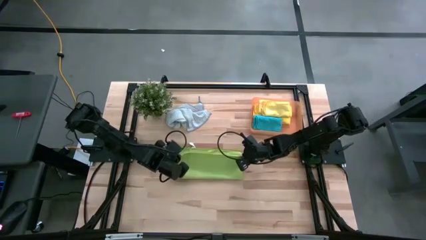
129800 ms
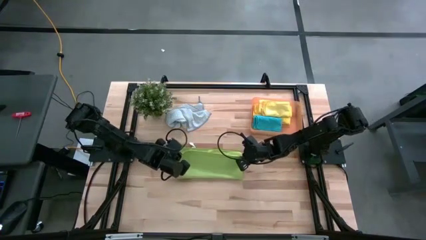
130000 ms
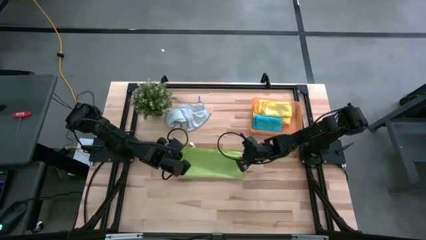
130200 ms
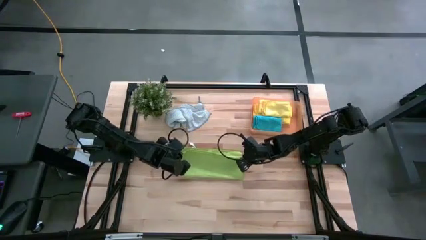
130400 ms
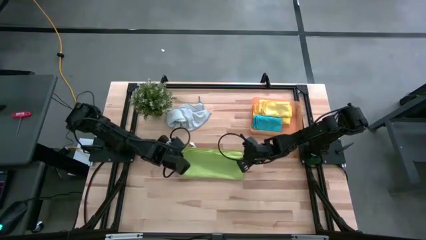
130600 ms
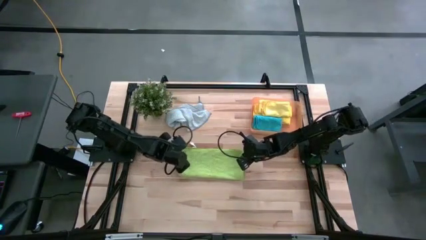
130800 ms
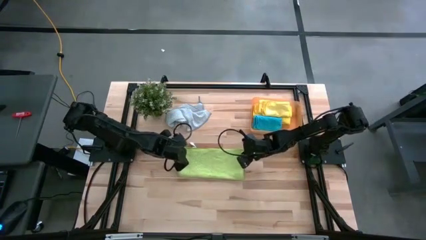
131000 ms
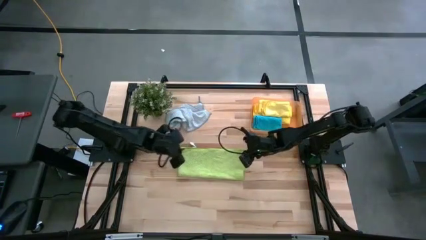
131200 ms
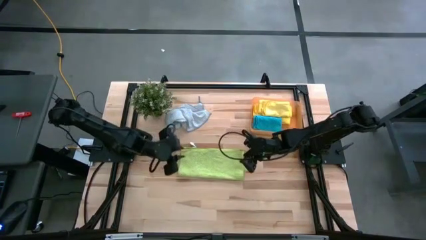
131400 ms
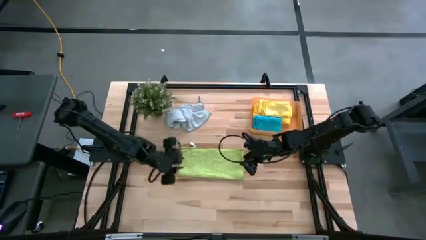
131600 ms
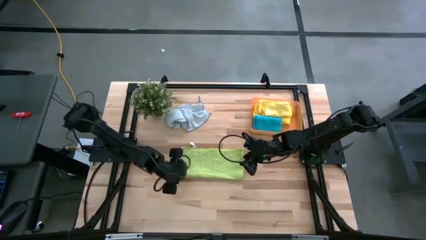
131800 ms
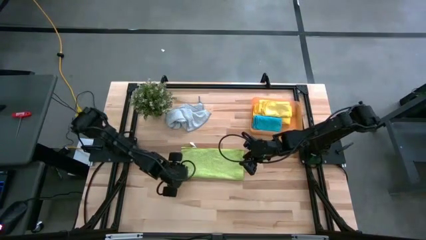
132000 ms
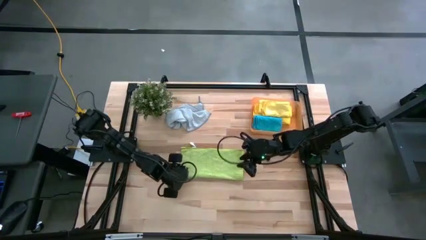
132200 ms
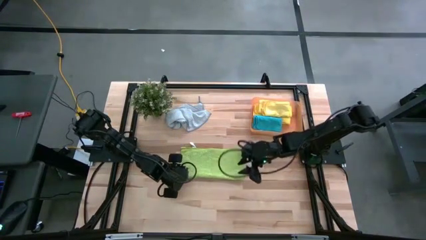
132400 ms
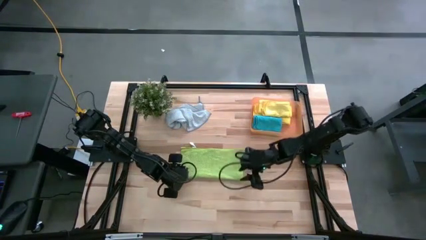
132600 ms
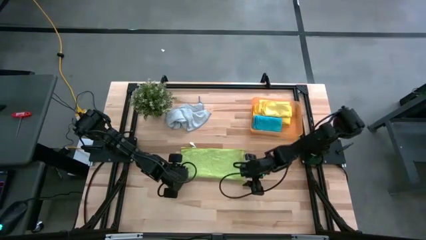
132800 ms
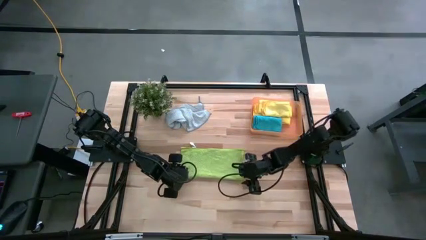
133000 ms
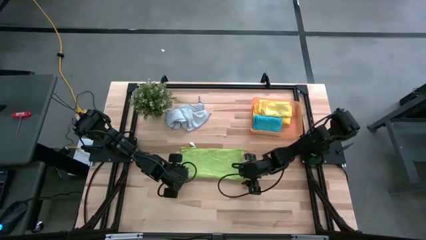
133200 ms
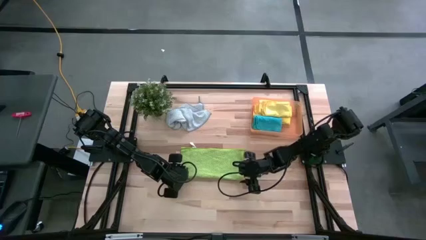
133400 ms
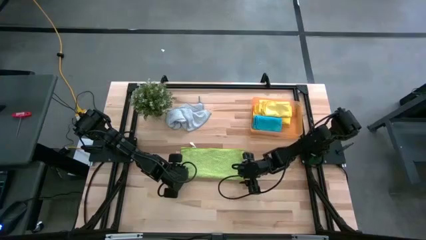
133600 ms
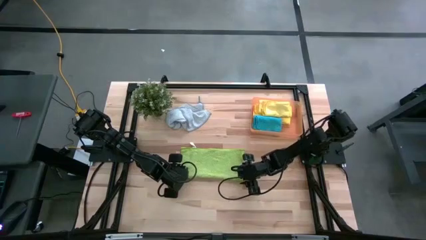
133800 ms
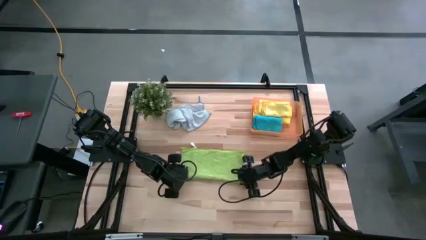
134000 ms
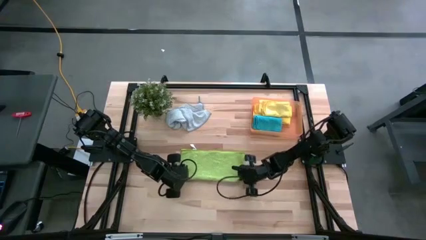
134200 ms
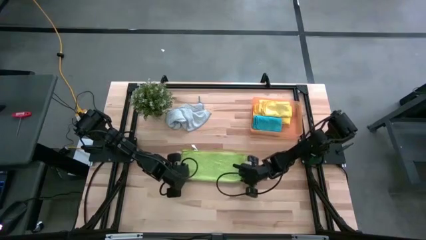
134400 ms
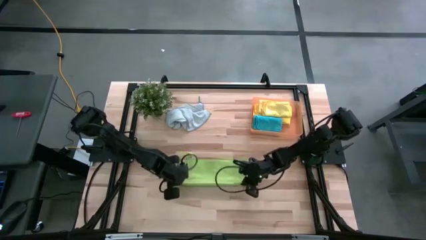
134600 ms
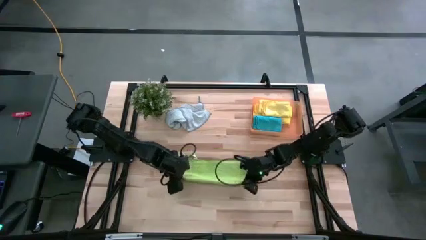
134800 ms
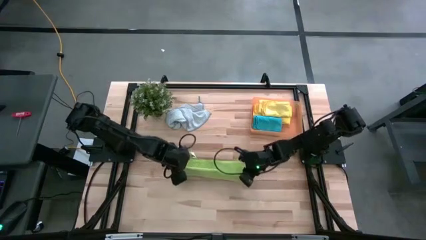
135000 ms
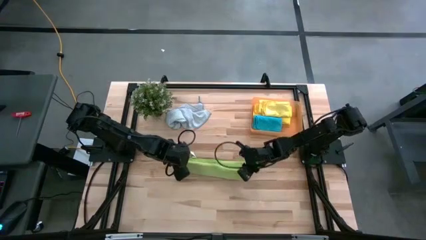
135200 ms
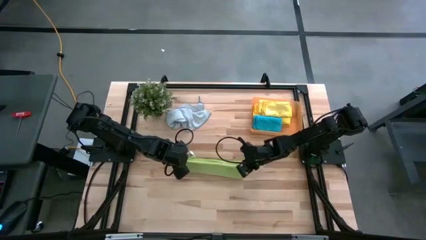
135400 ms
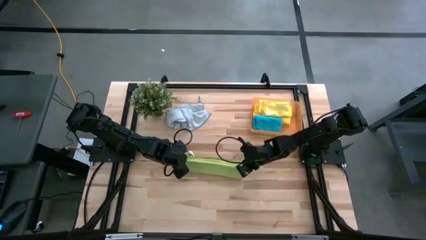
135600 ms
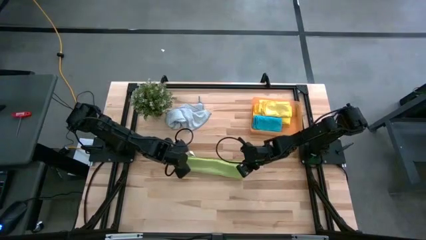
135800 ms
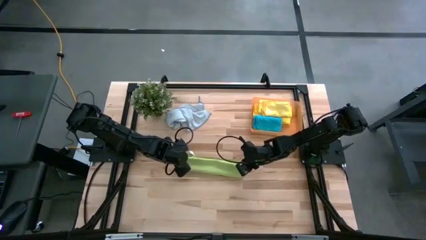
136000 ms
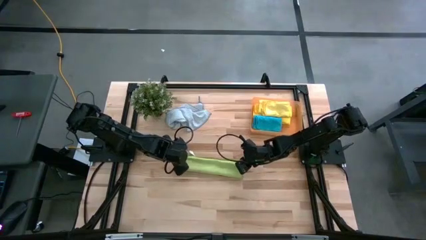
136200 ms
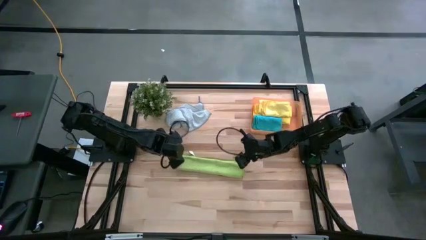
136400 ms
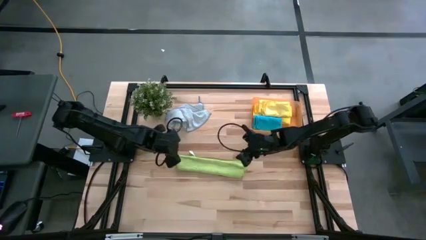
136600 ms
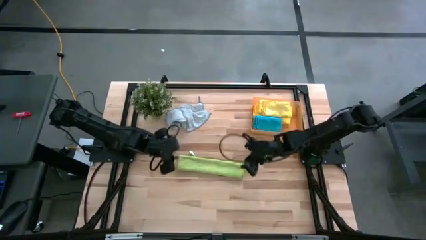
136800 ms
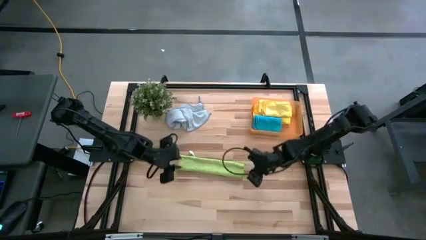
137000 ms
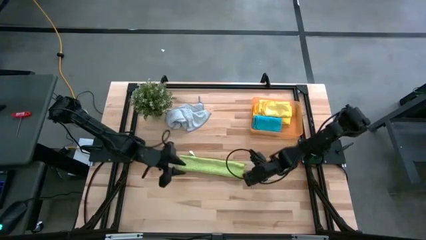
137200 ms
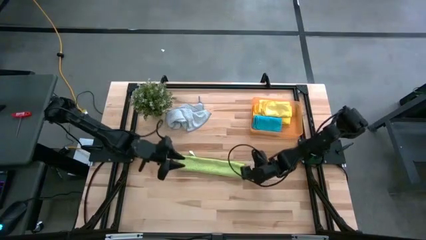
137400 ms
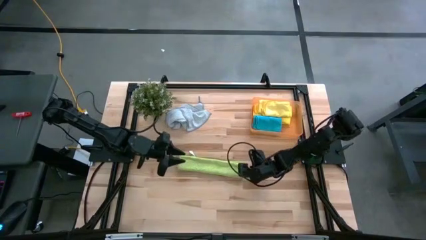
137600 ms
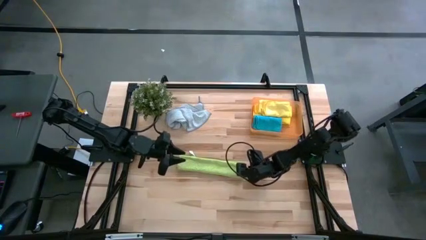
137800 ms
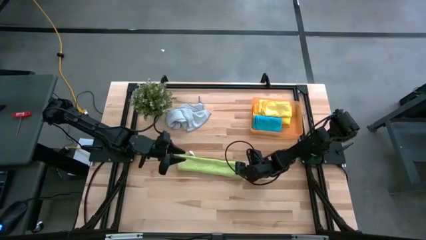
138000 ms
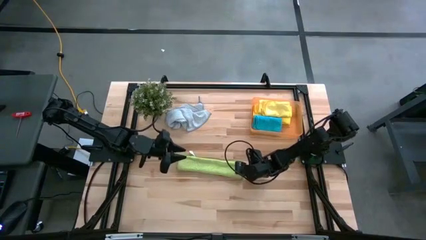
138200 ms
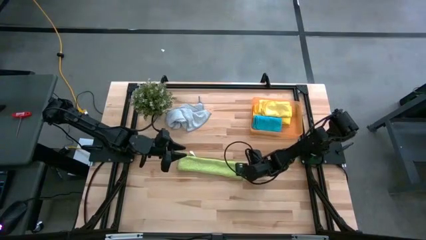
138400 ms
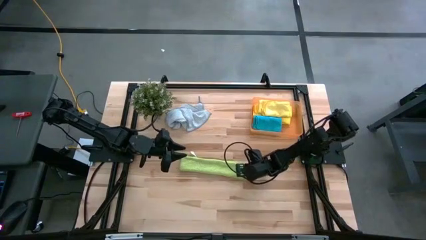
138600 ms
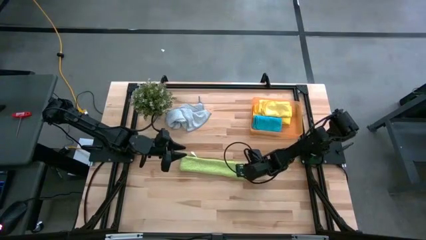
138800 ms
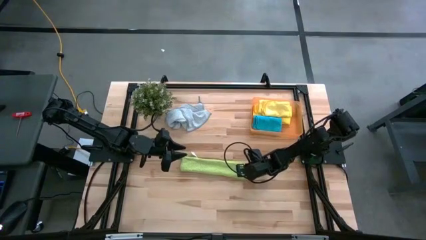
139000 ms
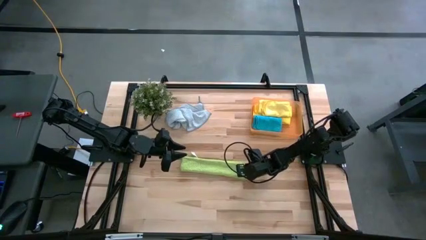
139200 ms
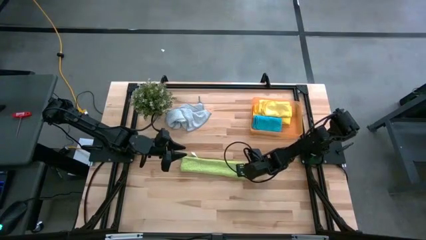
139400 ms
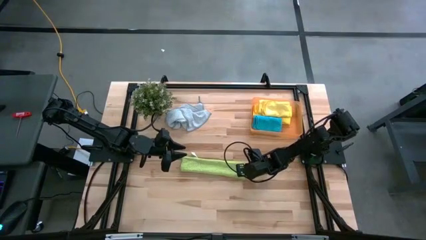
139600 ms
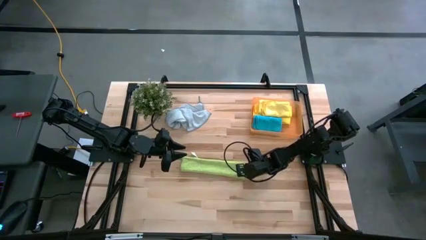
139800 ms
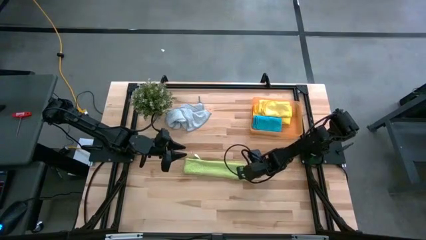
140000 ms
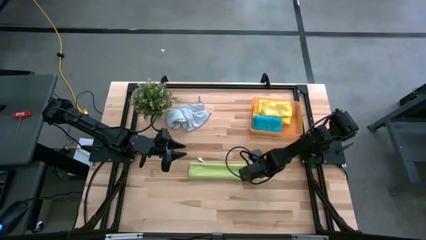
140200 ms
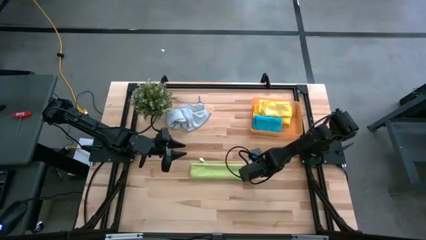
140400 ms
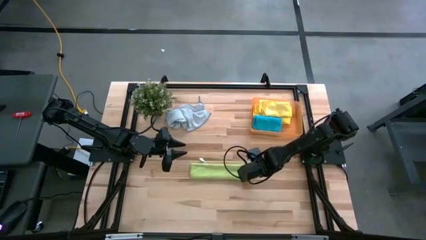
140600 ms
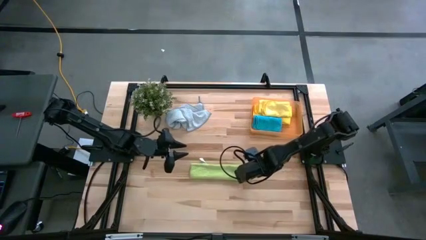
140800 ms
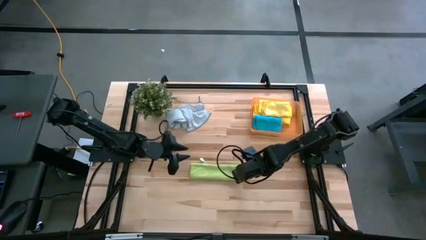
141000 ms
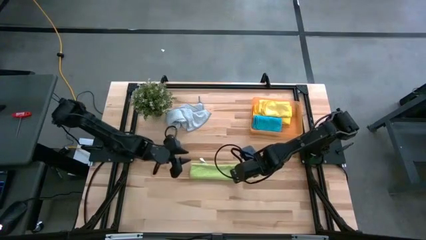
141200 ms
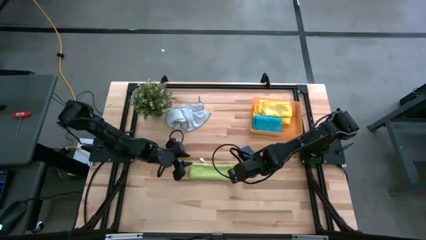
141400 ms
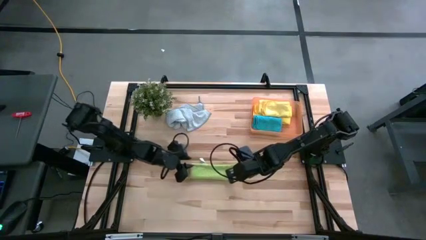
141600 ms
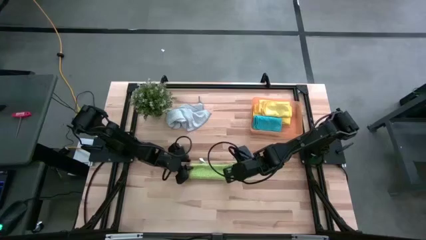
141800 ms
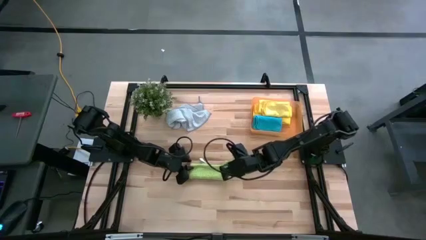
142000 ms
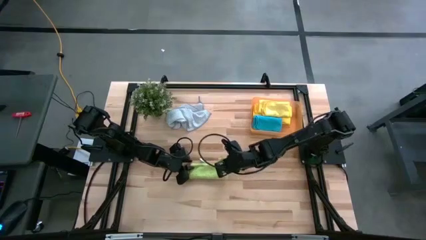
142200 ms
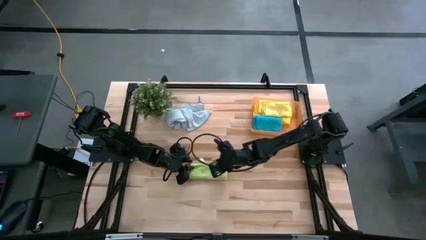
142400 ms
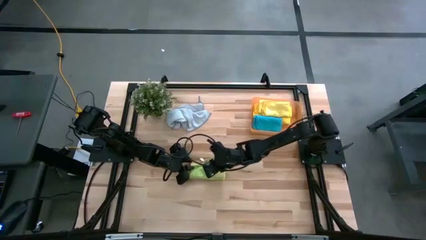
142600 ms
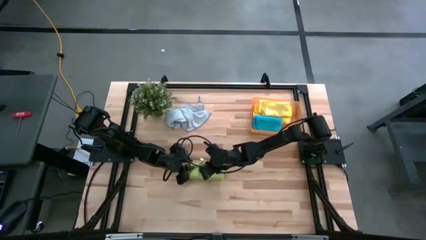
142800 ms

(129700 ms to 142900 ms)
Task: Fold microfiber towels
Fold the green microfiber cloth

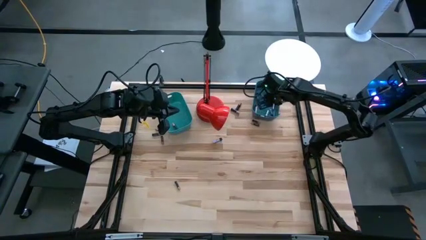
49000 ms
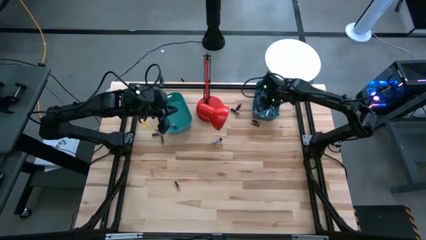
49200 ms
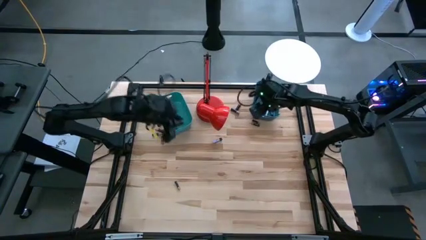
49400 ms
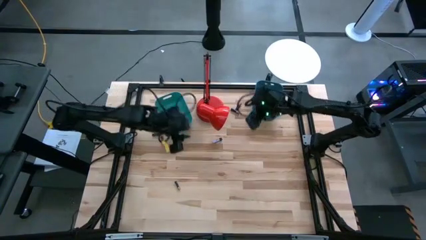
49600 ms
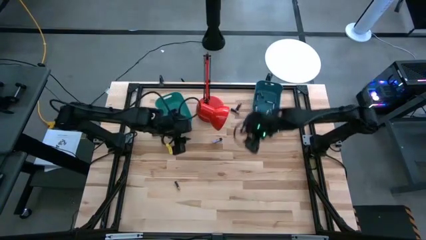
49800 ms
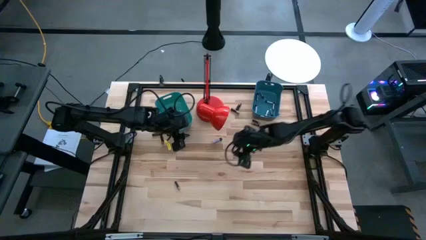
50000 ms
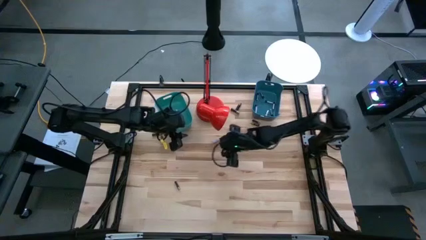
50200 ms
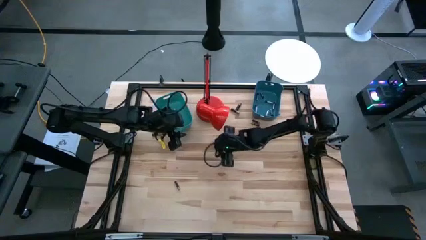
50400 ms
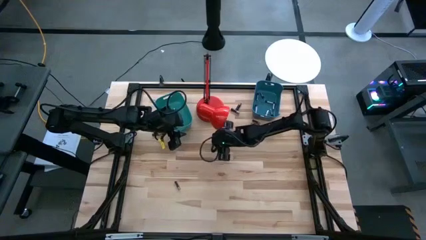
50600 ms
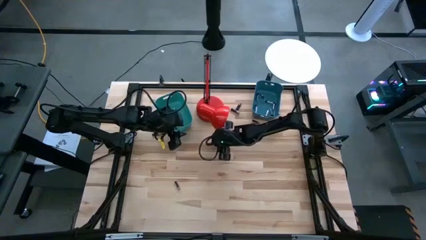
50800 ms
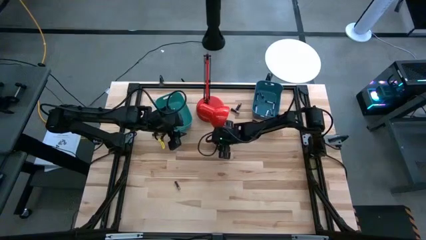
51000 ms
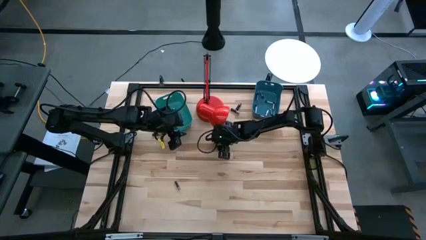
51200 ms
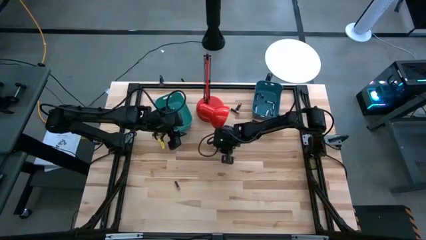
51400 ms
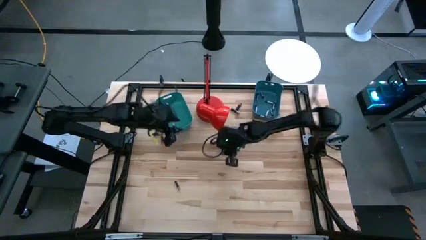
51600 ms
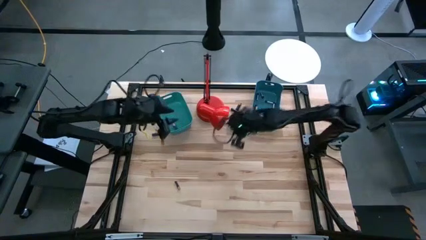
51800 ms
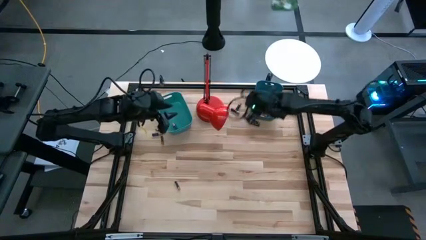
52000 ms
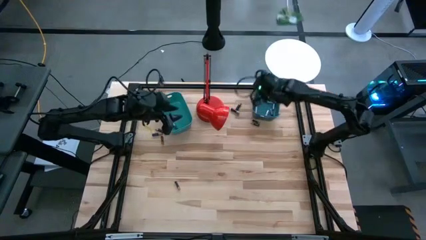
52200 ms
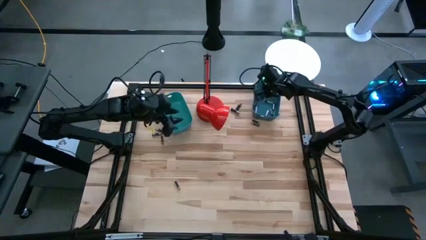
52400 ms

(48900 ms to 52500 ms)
Task: Sort batteries
Put the silver battery into the blue bin
